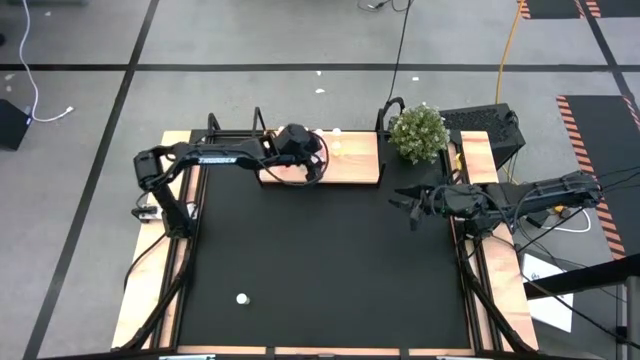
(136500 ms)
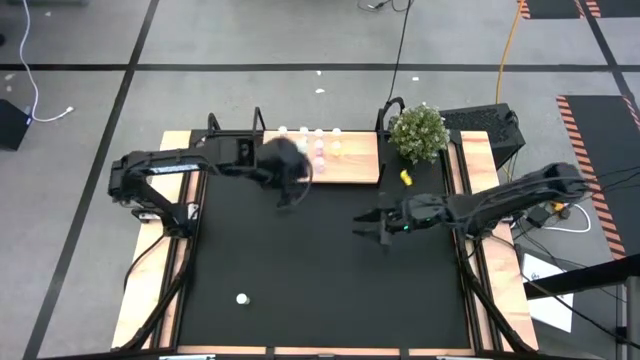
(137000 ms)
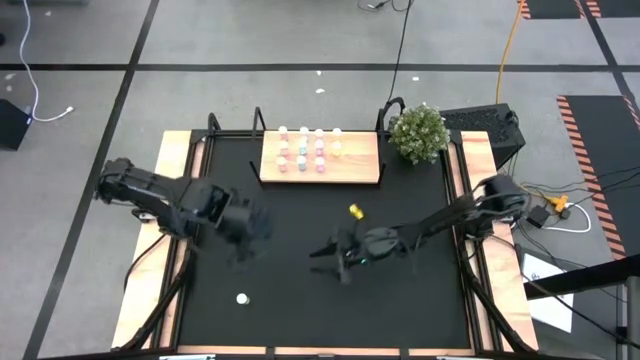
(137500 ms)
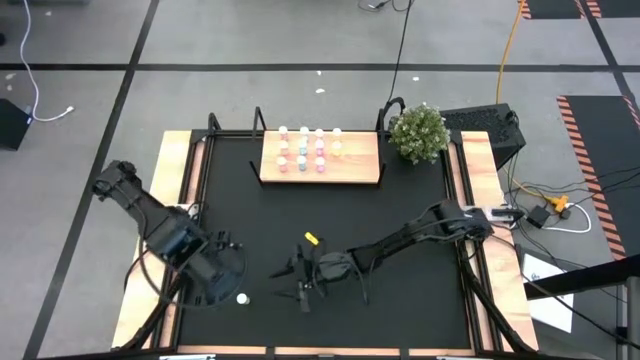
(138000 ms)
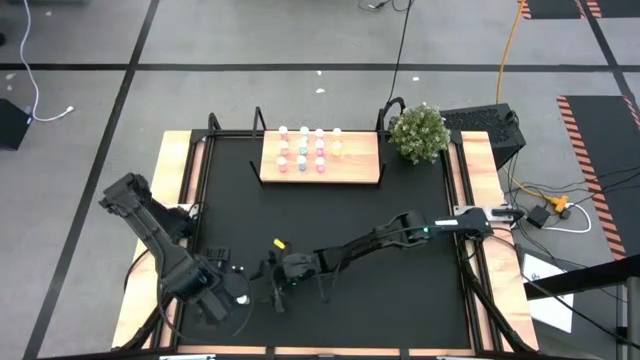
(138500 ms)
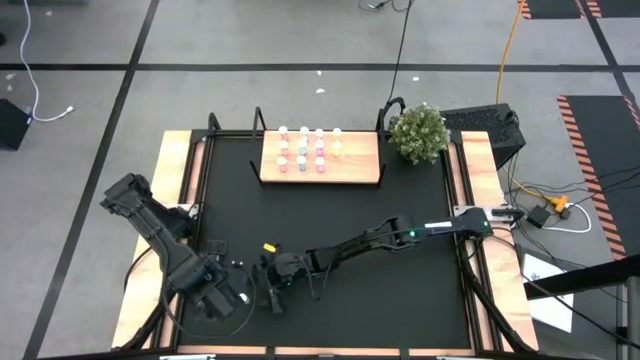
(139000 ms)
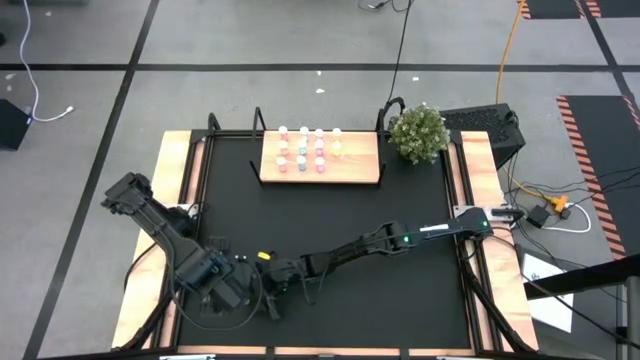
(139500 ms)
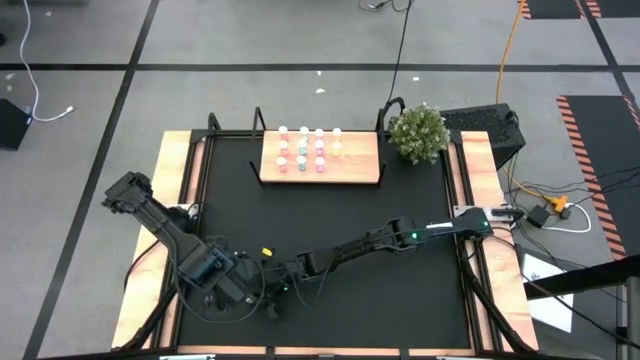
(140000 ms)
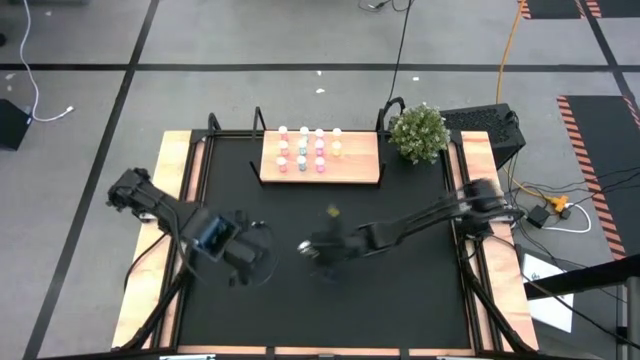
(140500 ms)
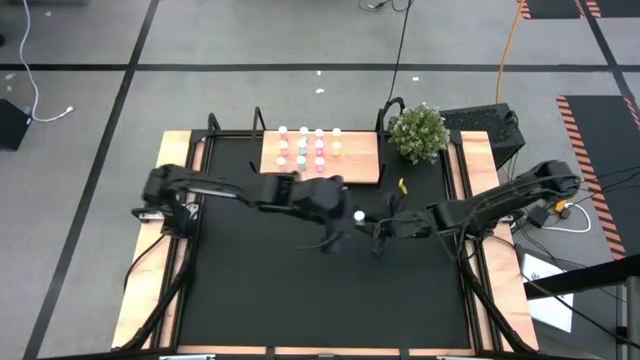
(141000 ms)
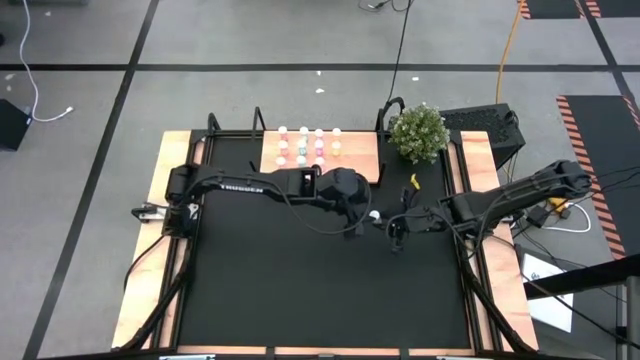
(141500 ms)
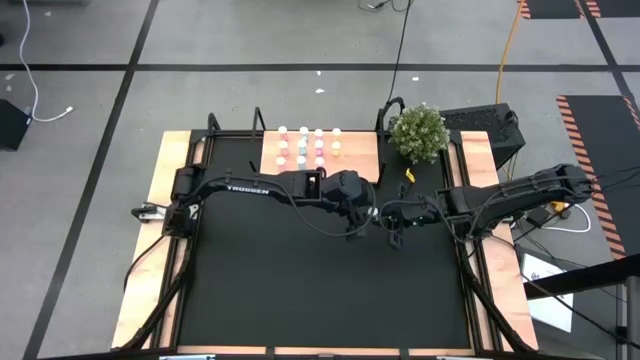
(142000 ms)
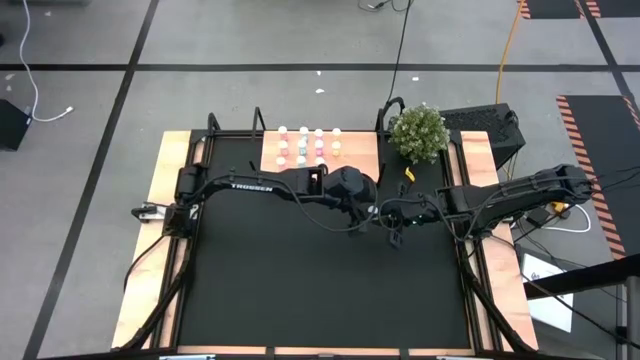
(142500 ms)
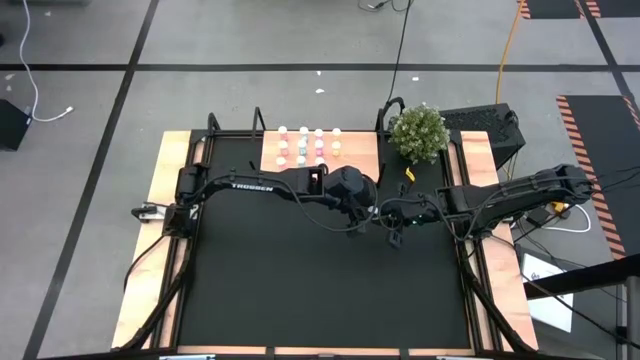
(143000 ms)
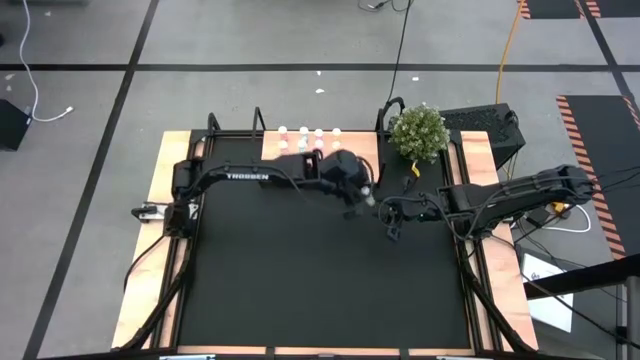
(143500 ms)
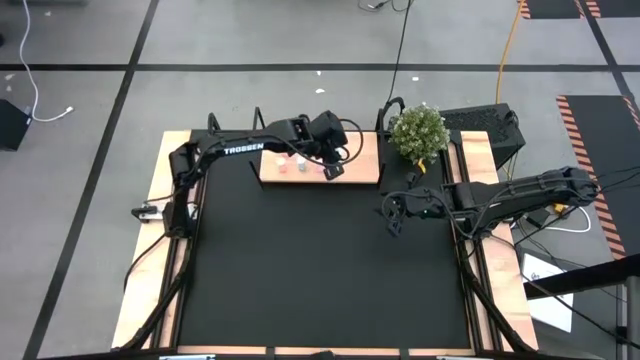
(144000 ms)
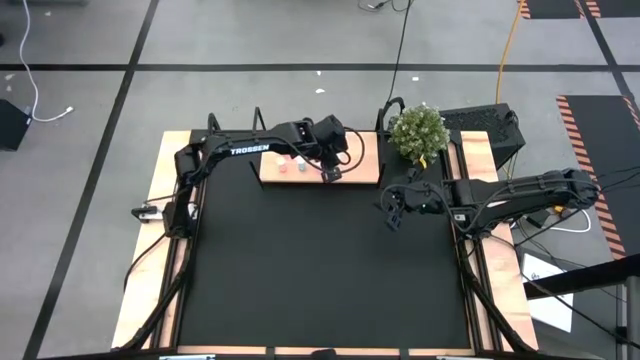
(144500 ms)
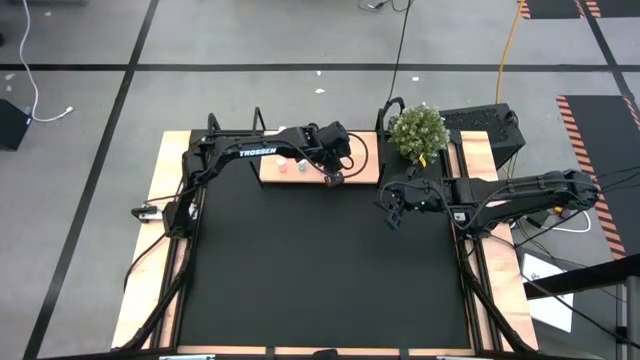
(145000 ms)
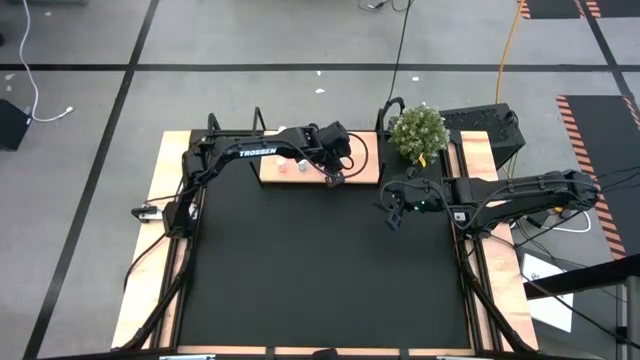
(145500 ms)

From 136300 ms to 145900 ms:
Task: Pick and place medicine bottles onto shelf by color
Put the yellow pill bottle on the shelf aligned with the other yellow pill bottles

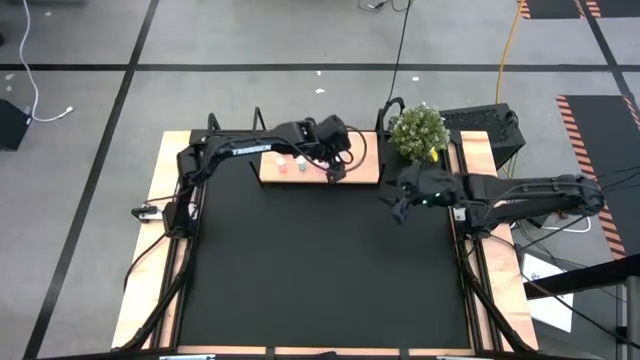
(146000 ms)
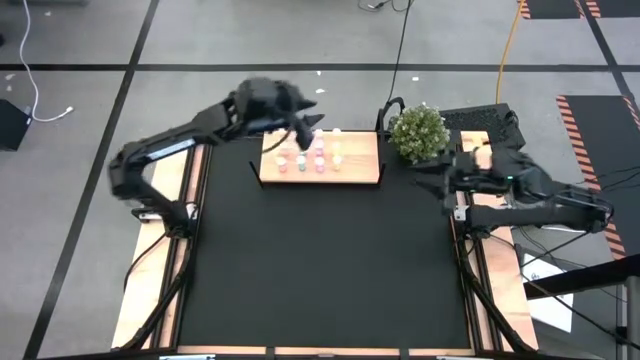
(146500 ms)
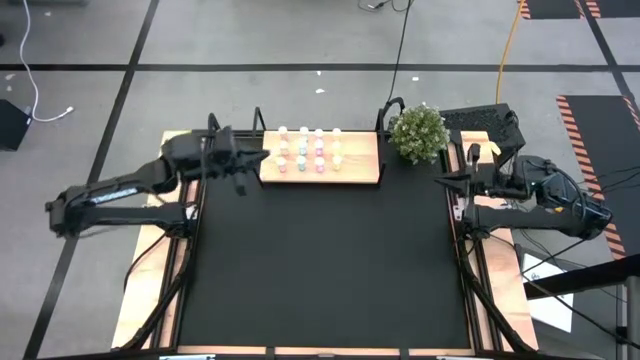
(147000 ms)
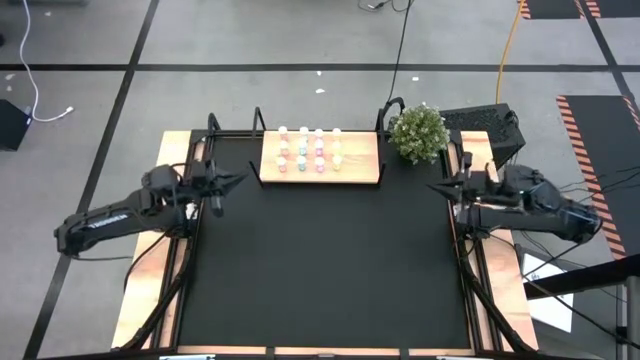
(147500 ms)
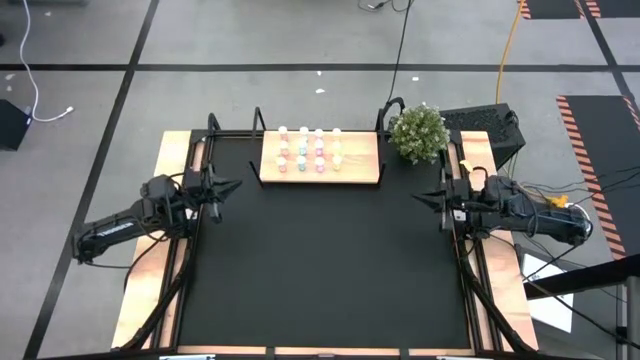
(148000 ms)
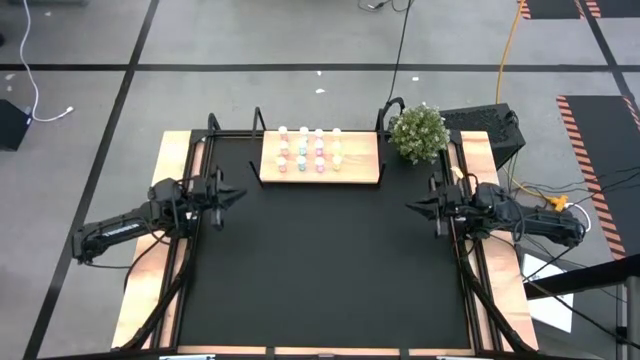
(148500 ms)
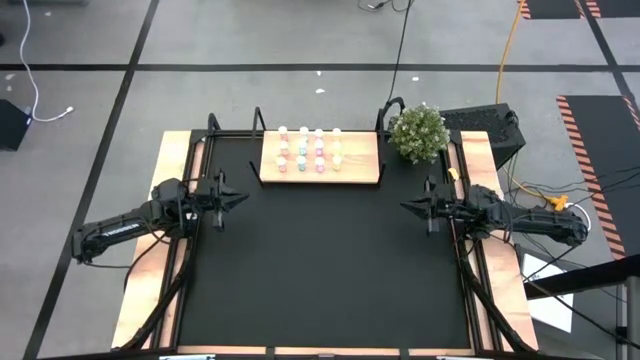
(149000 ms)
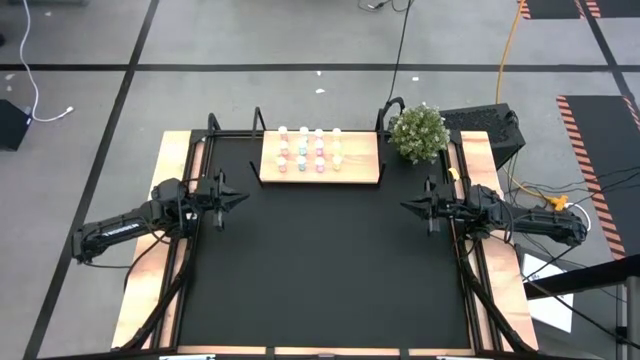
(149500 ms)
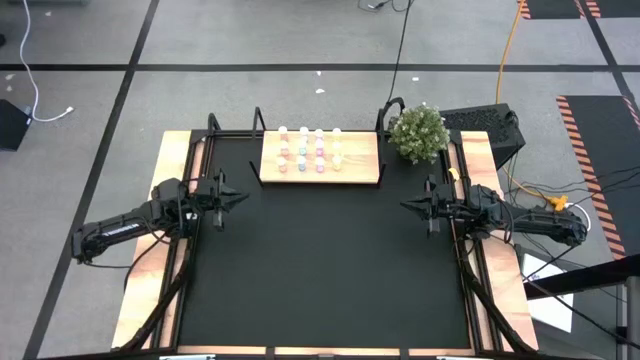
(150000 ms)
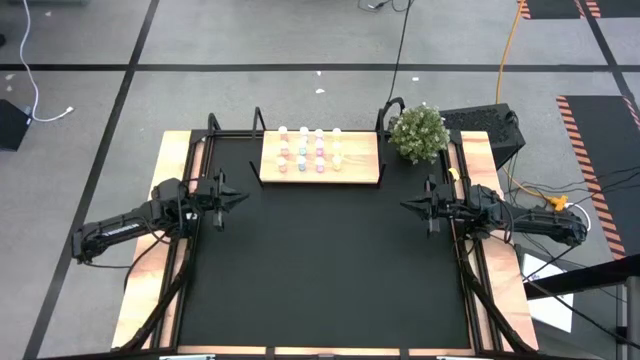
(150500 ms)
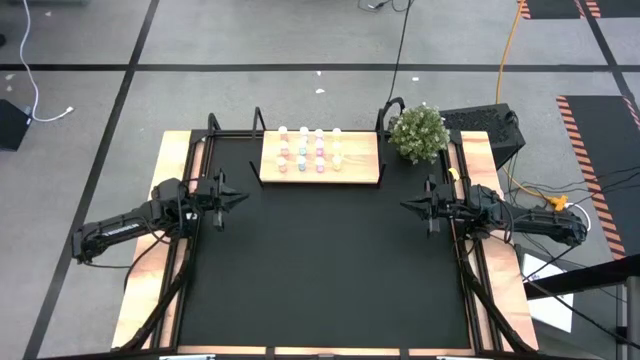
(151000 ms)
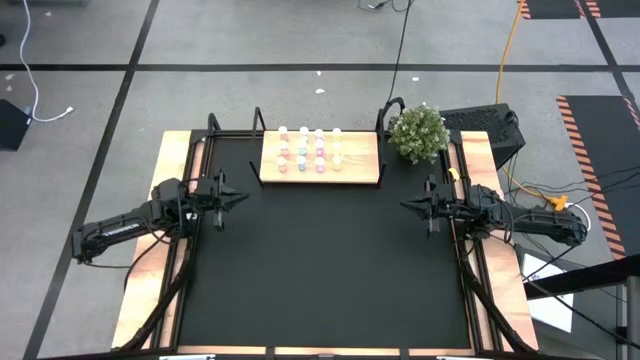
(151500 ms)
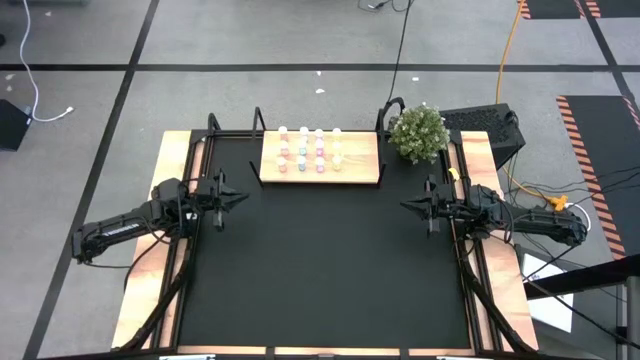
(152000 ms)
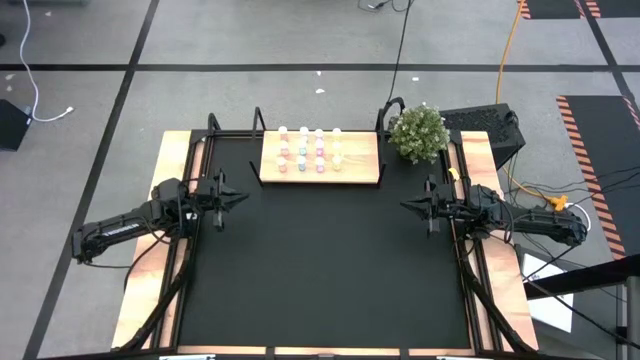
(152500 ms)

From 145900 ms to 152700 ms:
Return to Home Position

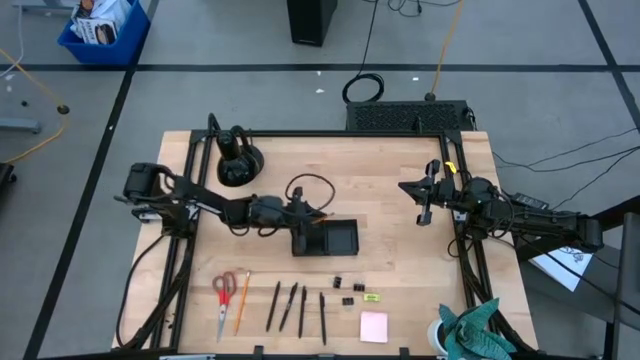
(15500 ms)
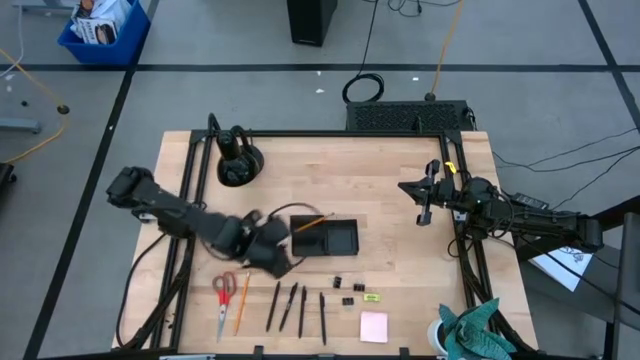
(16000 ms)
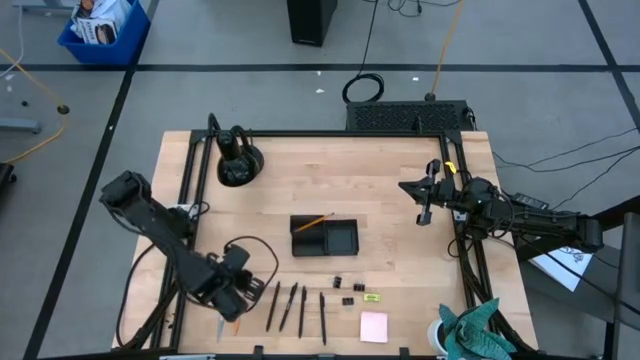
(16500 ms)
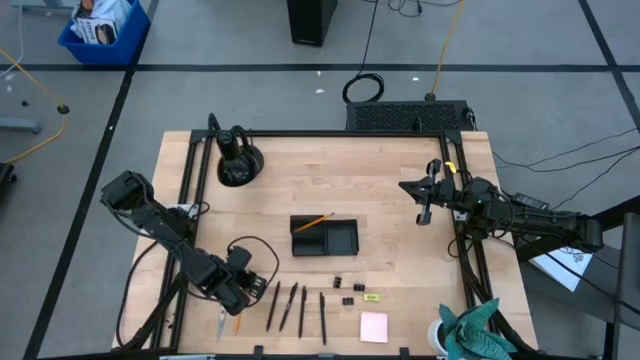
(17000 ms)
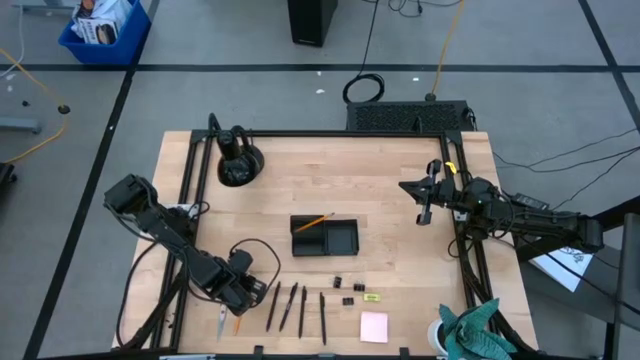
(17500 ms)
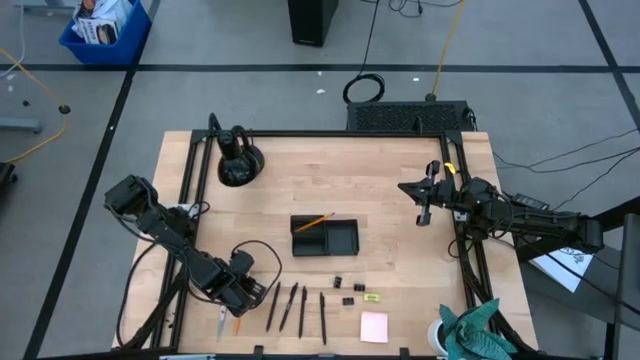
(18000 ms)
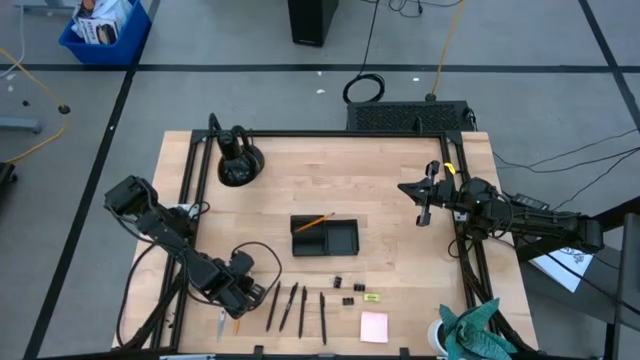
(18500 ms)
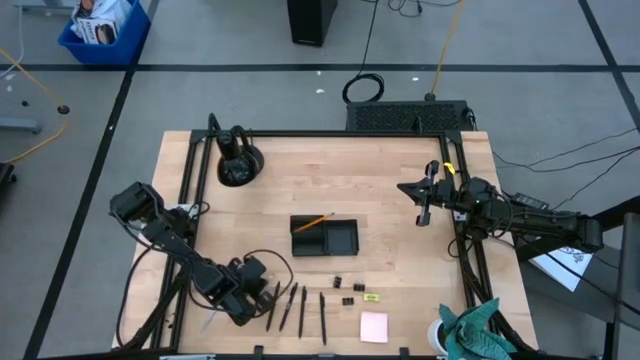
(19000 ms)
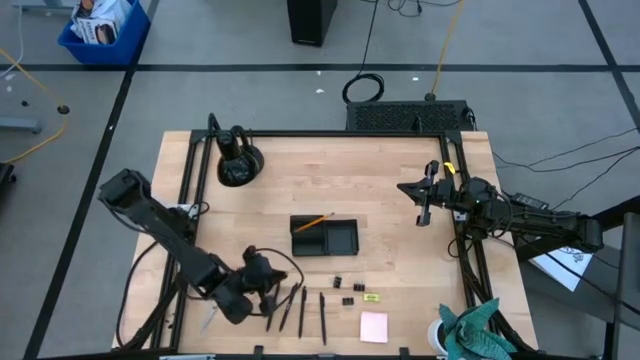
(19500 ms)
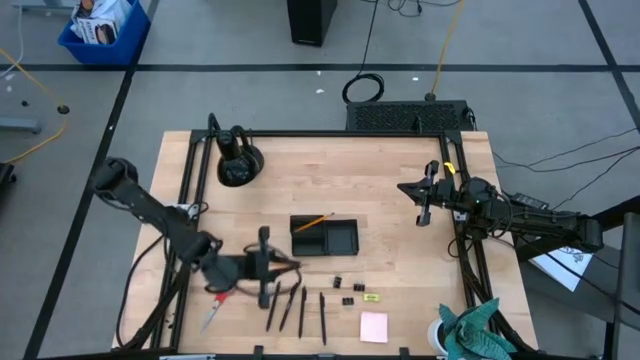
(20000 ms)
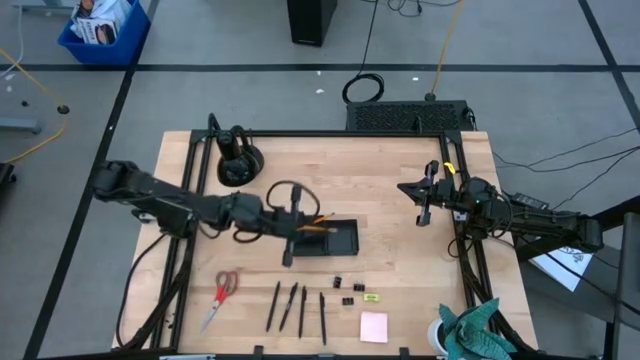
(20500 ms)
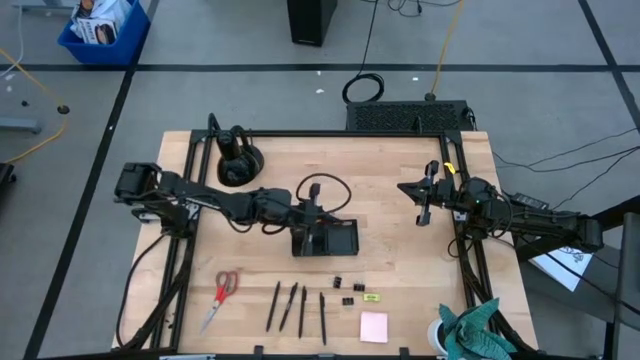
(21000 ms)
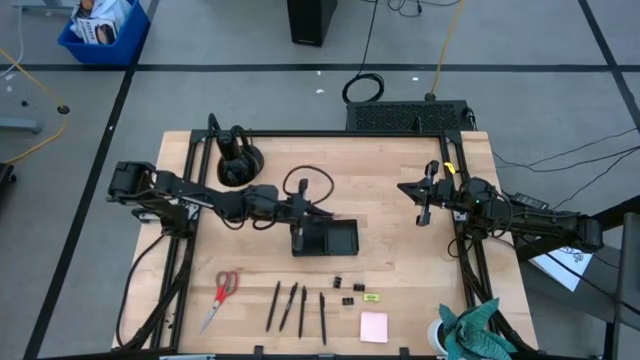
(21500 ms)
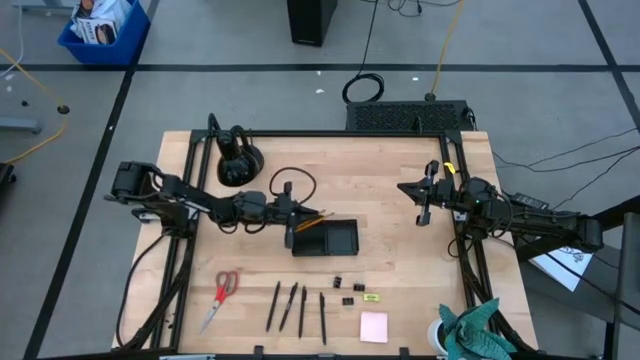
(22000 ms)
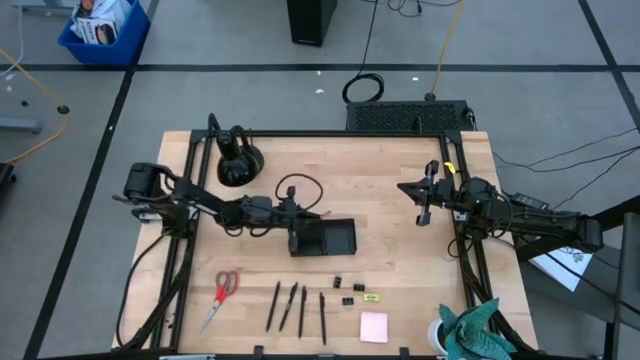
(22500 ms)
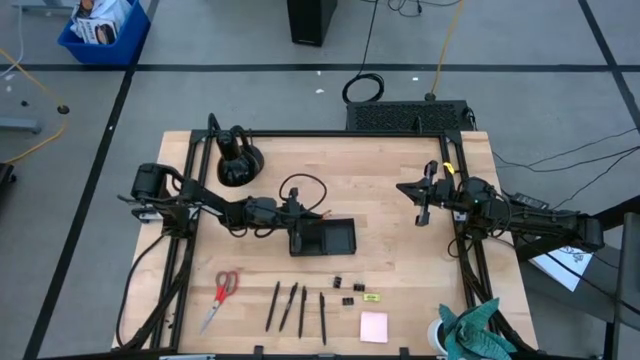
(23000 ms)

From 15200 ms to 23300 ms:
Task: Pick and place office supplies into organizer
Put the orange pencil into the black desk organizer
